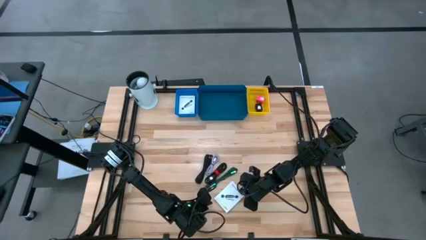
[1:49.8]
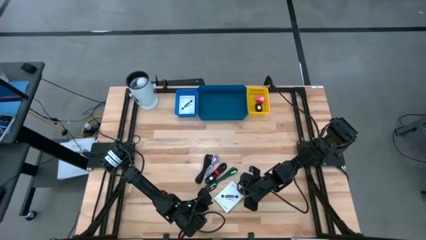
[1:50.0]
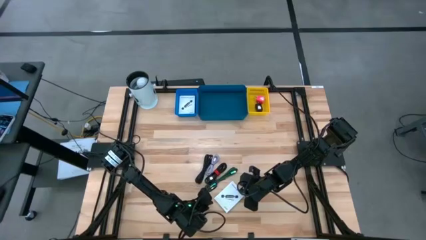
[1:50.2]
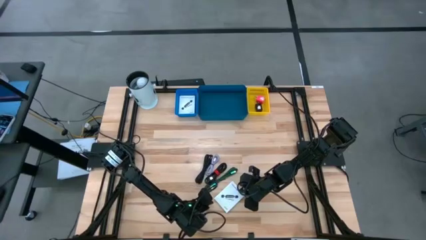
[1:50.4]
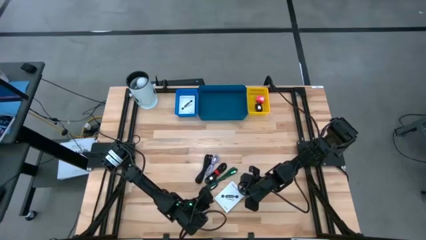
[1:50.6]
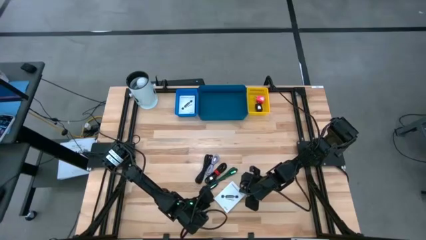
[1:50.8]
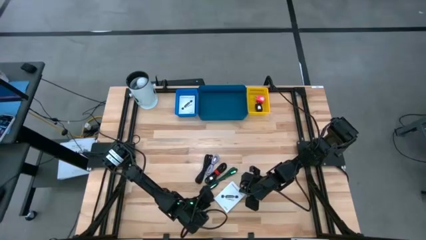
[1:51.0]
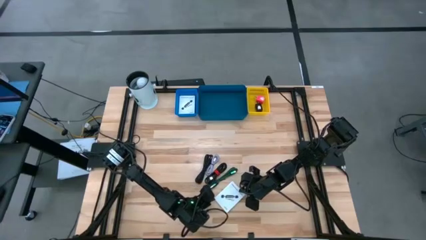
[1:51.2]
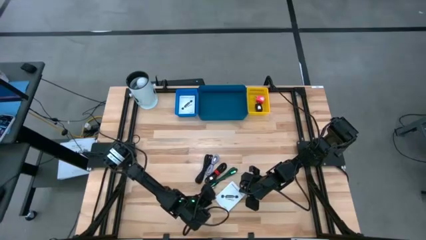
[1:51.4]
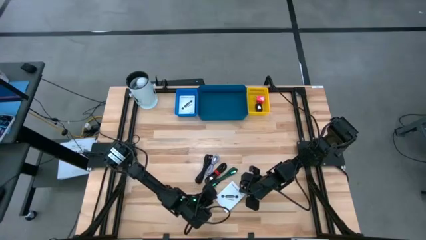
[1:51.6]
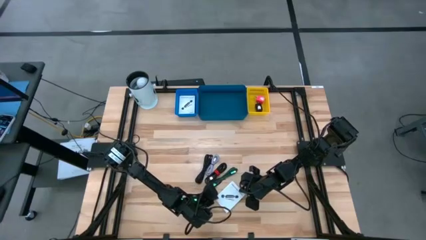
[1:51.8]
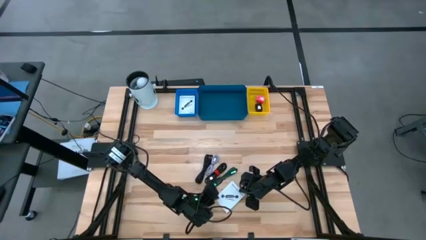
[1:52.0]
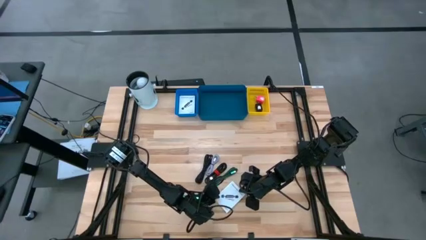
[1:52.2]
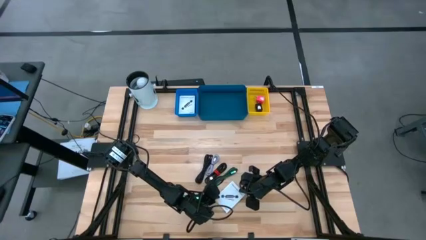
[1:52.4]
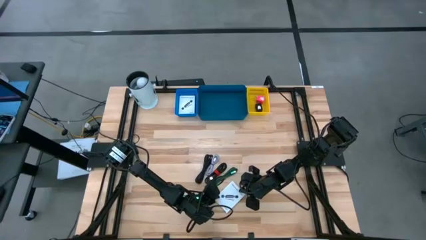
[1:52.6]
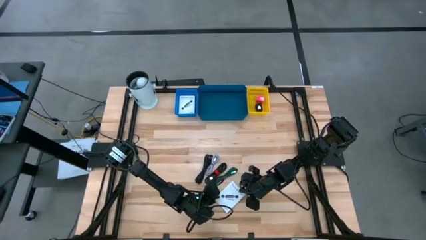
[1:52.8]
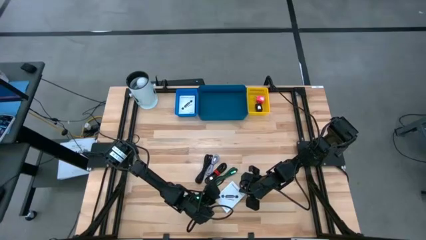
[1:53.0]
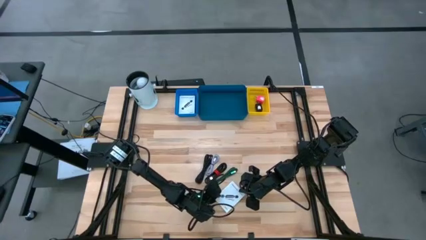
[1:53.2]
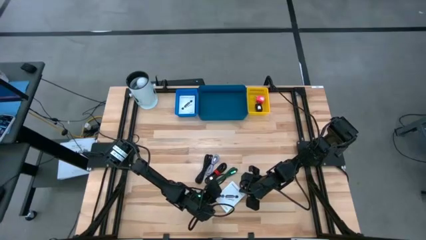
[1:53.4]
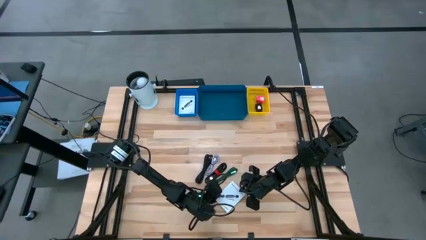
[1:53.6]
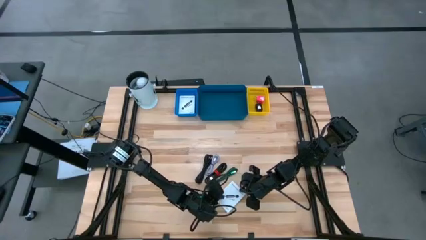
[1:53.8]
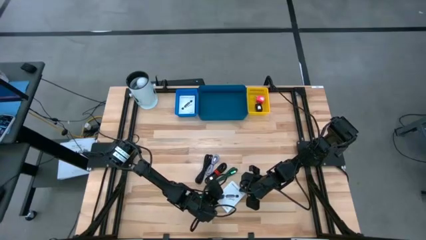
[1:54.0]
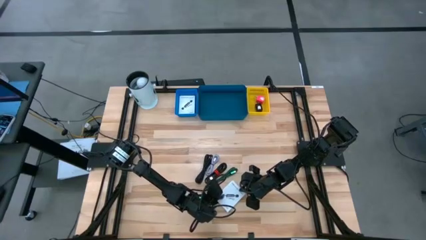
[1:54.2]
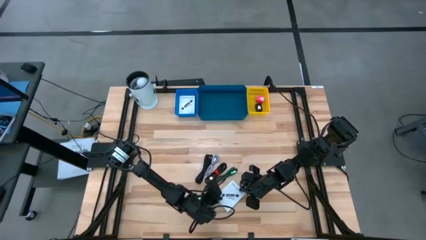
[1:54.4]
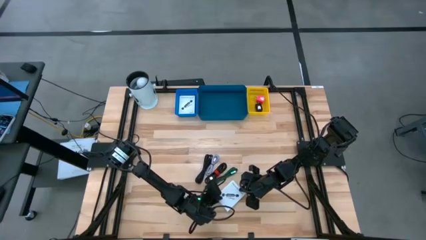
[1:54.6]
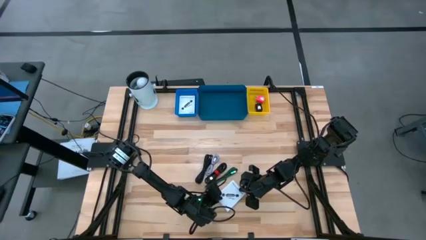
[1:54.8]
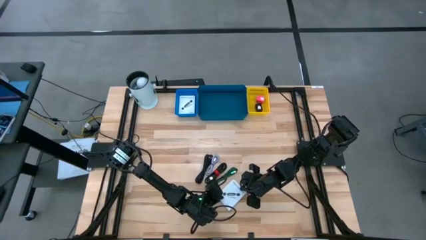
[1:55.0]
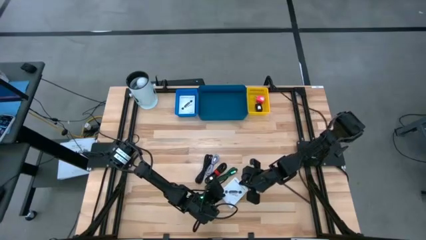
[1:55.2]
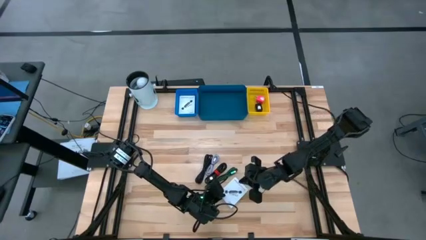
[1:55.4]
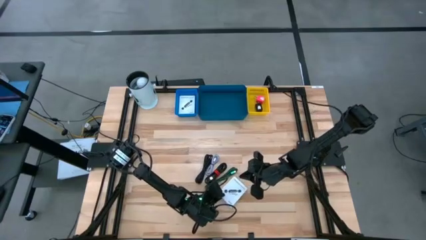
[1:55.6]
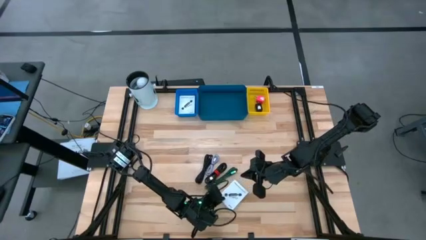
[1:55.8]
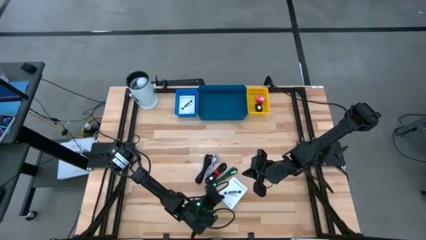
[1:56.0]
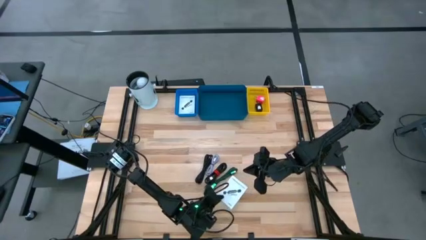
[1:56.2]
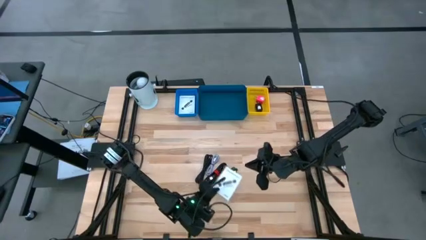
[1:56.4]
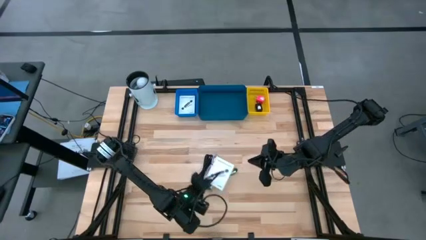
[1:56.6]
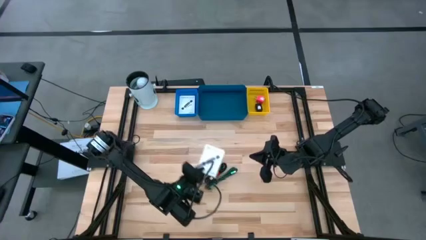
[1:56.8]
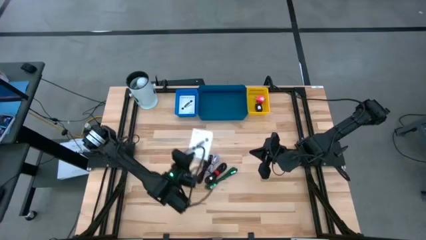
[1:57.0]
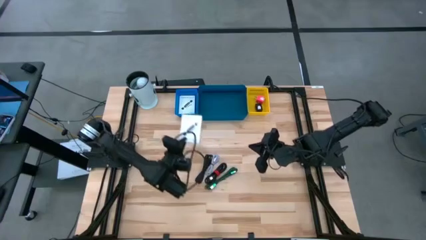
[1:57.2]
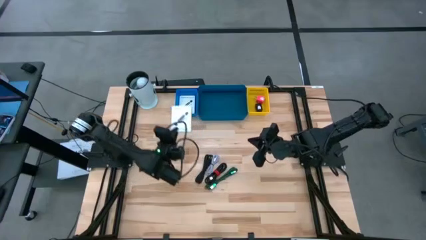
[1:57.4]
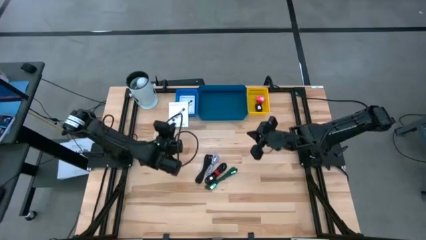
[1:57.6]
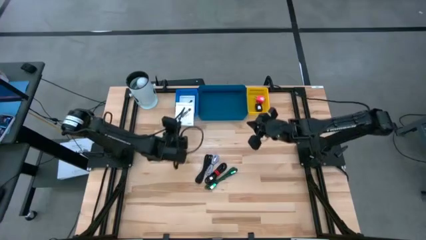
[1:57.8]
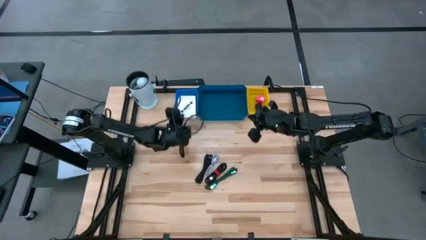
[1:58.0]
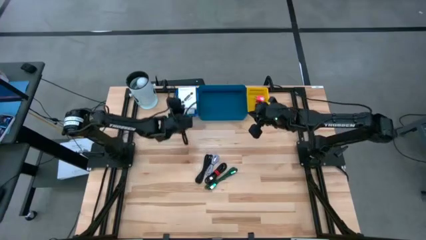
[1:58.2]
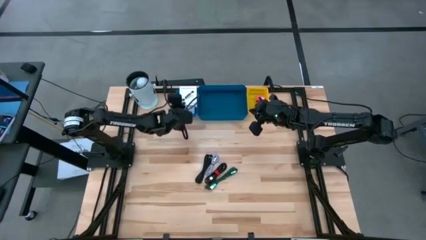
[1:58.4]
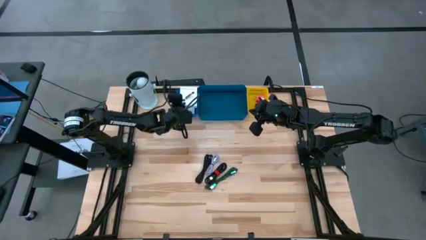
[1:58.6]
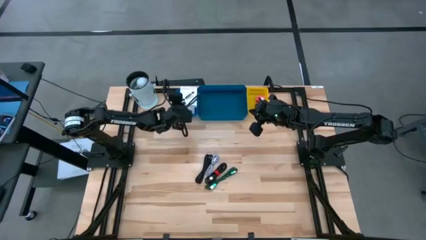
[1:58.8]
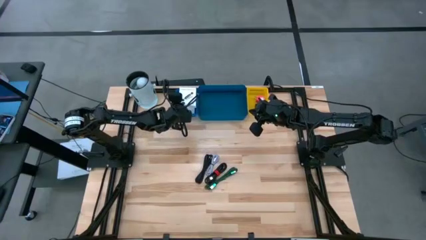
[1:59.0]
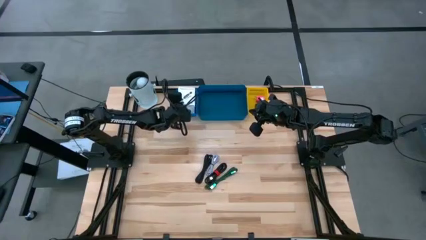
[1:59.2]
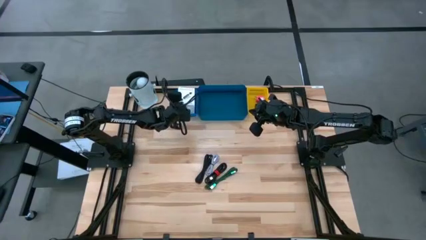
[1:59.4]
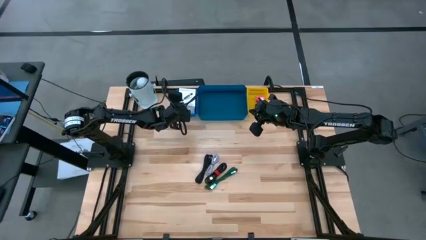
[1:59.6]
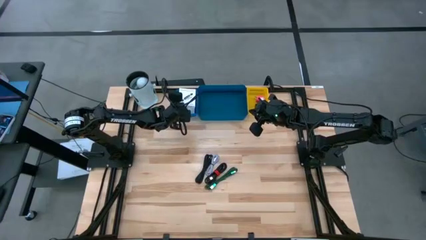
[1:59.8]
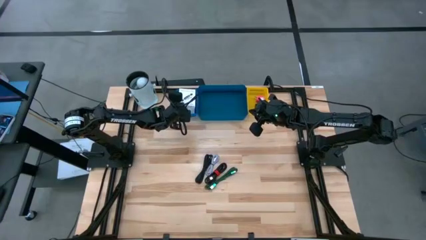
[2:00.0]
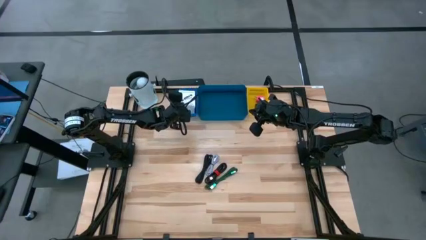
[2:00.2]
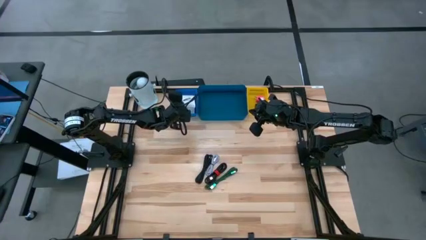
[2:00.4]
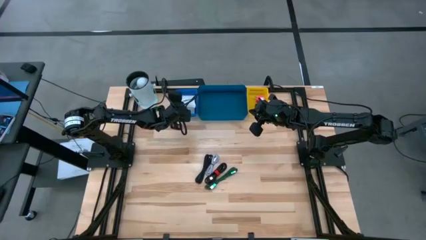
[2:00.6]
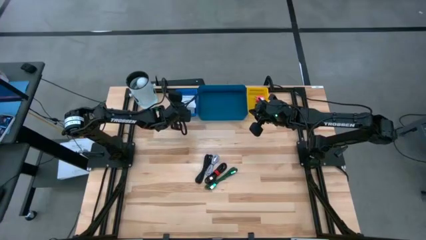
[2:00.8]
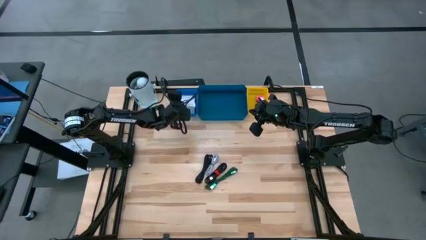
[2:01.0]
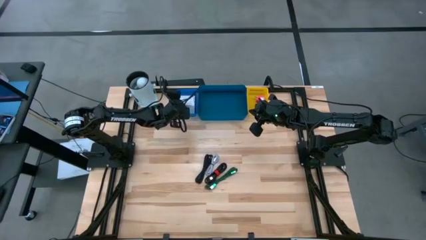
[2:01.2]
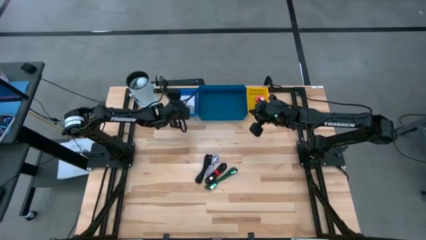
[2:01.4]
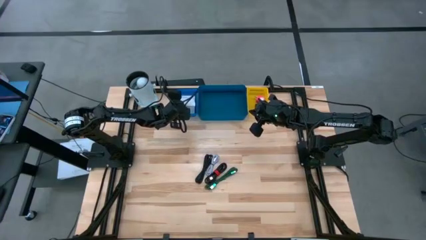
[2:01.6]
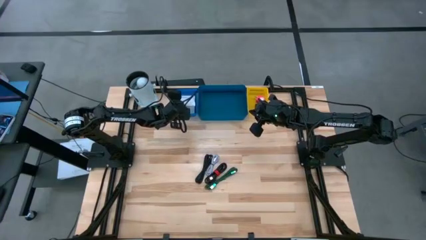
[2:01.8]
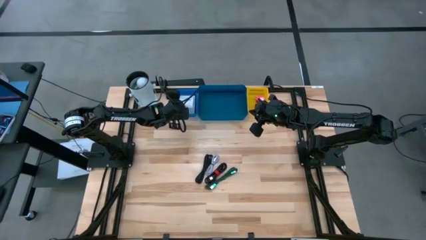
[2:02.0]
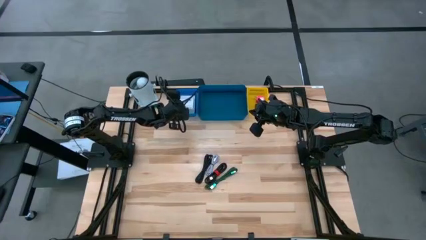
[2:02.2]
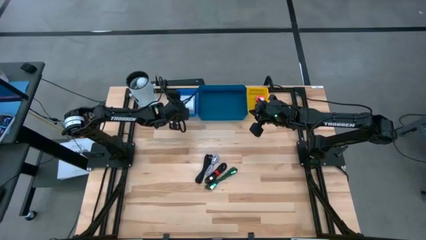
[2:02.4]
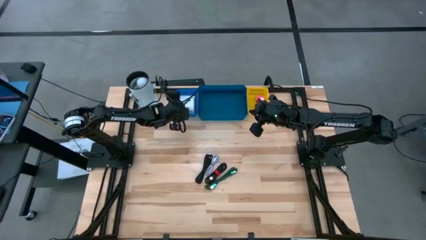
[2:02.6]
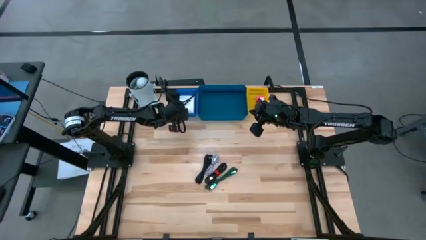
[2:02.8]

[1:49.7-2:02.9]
Task: Pick and place items into bin
Put the card reader box into the blue basket

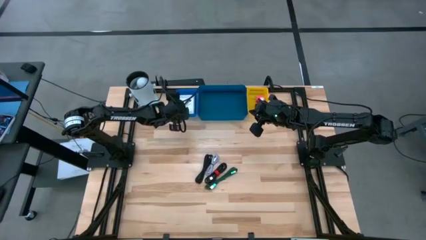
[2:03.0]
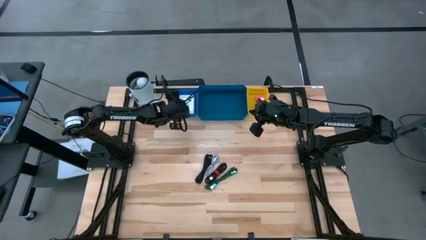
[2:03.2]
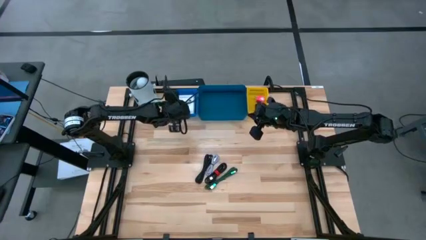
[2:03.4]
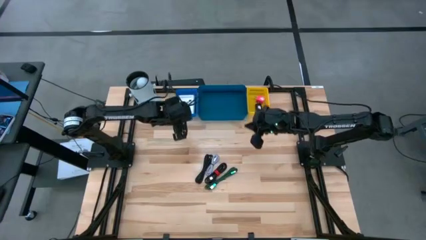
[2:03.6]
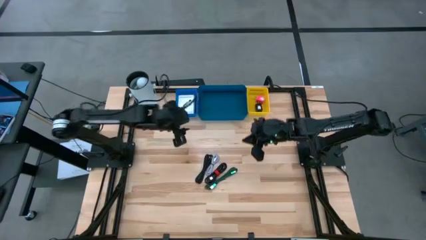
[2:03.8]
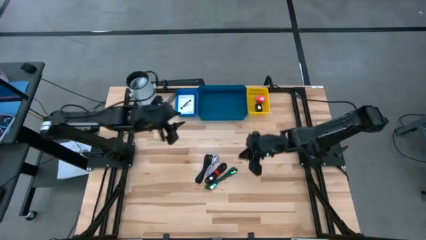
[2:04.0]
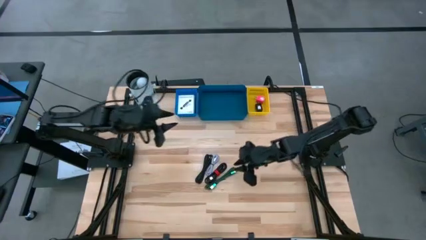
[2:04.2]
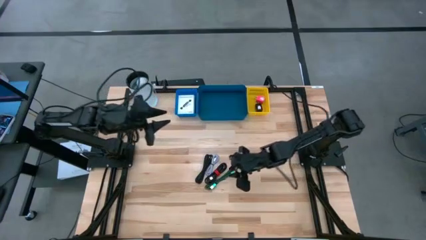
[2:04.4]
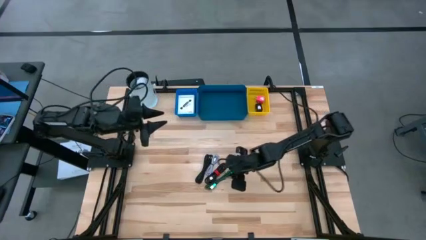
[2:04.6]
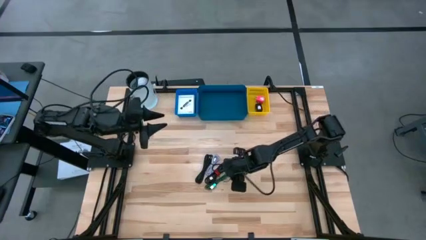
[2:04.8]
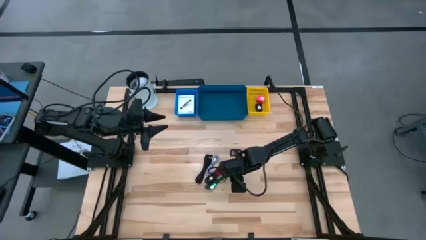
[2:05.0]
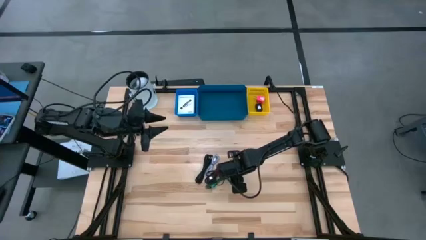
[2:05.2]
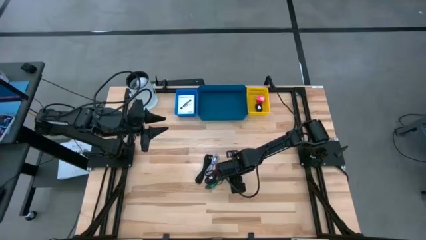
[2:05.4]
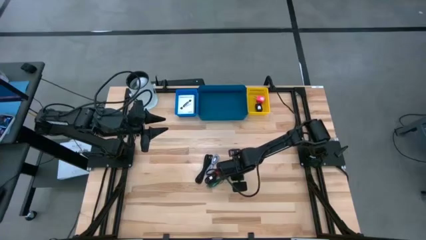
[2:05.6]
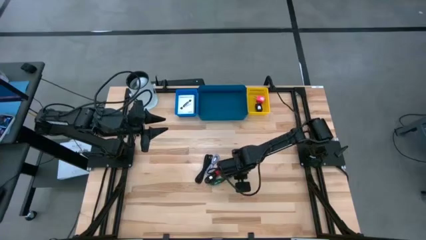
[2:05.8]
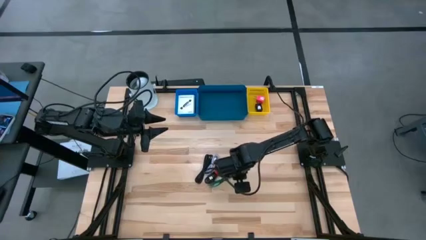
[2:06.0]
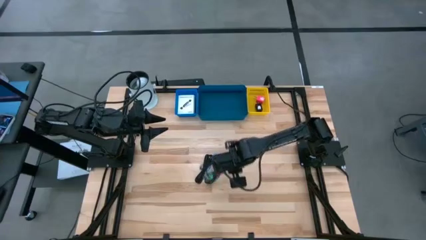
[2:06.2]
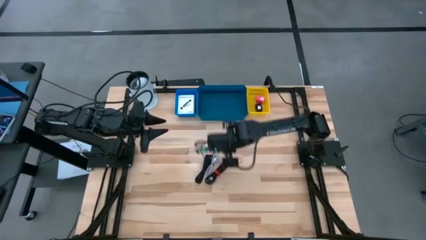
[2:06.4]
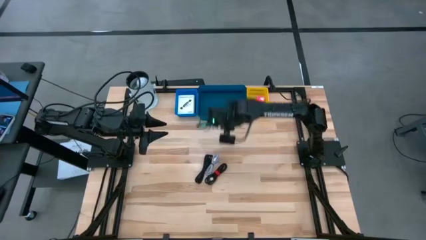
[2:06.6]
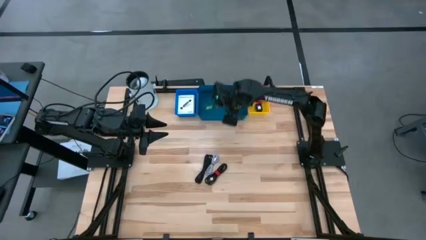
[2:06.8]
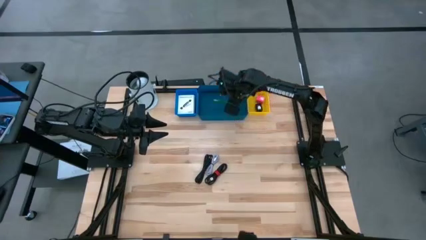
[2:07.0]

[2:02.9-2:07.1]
Put the green charger cable into the blue bin
